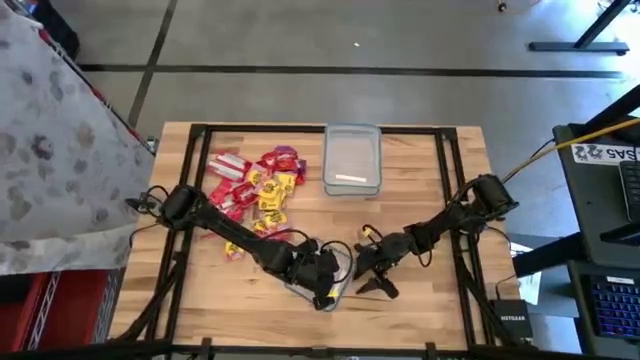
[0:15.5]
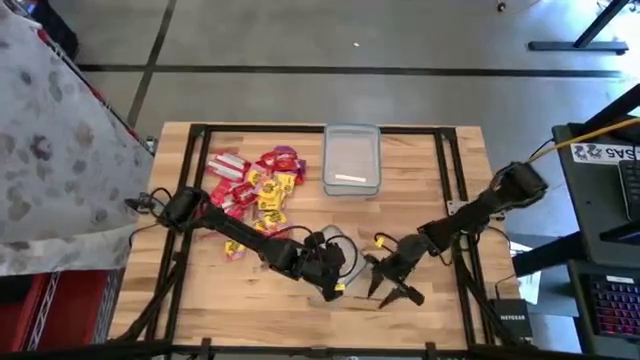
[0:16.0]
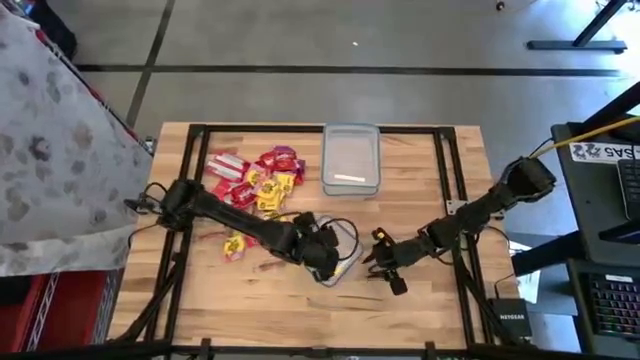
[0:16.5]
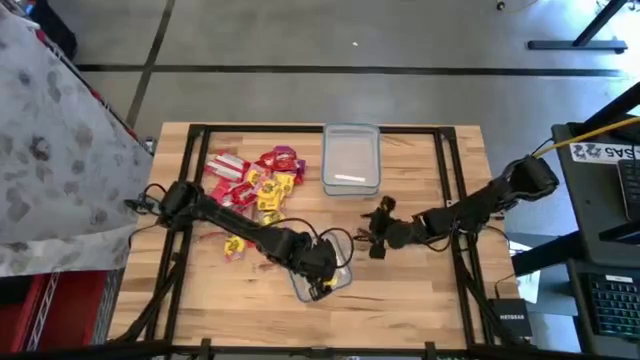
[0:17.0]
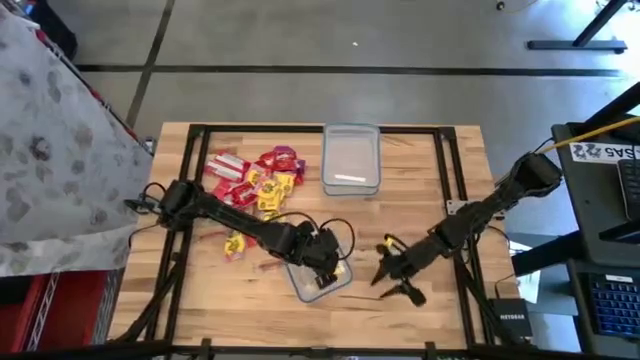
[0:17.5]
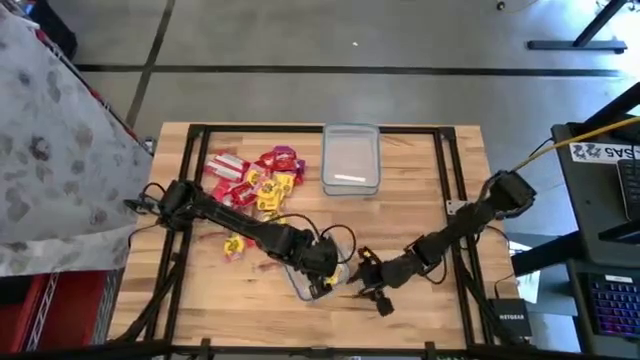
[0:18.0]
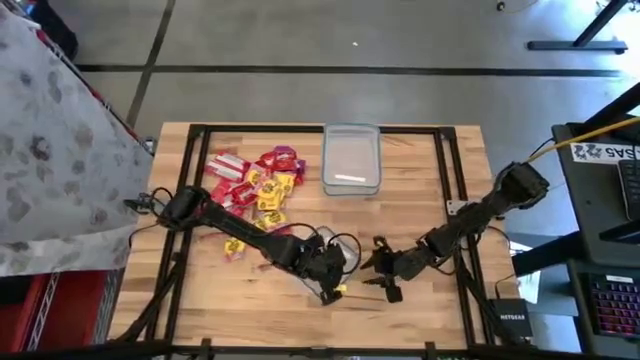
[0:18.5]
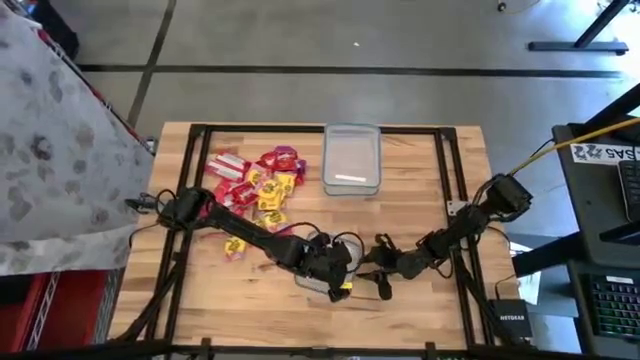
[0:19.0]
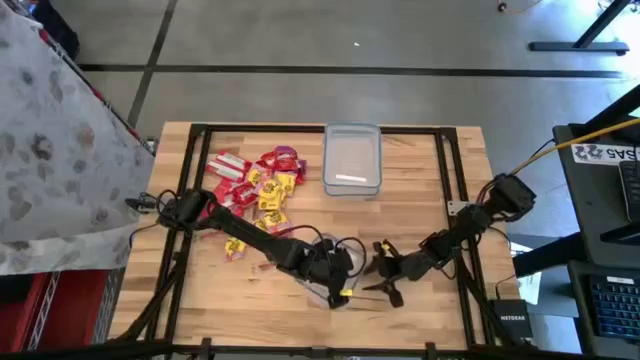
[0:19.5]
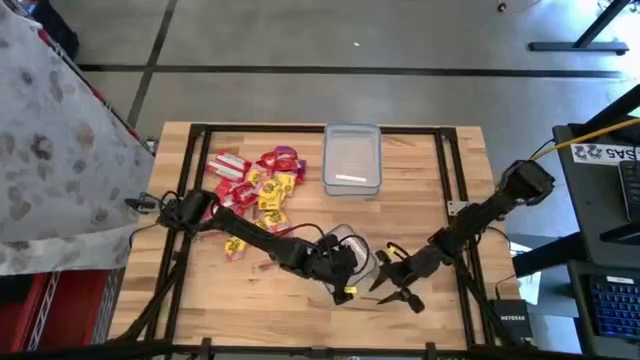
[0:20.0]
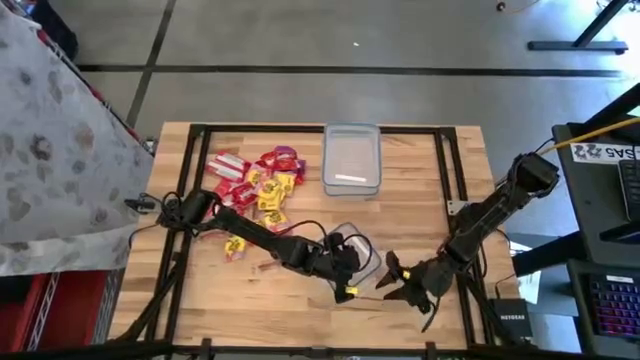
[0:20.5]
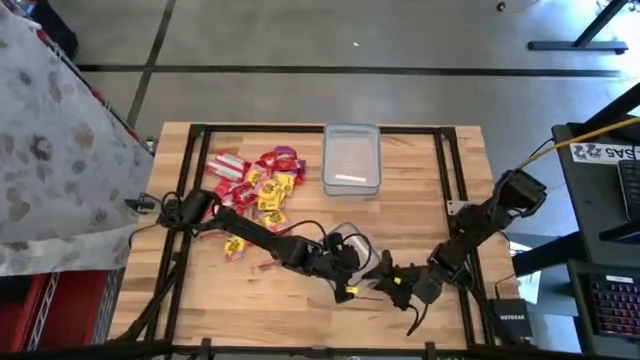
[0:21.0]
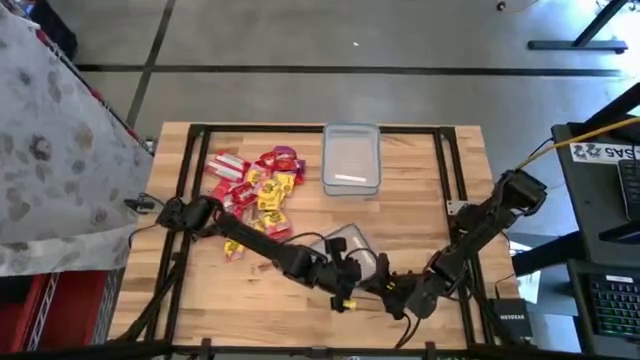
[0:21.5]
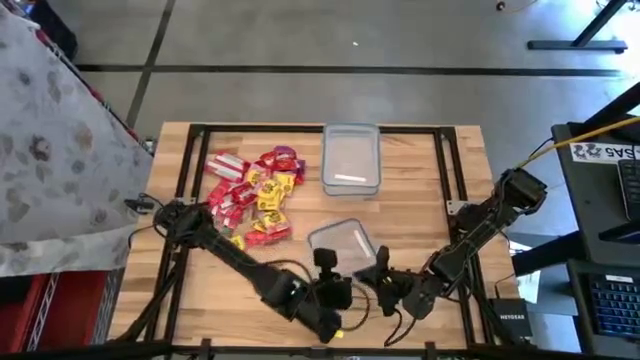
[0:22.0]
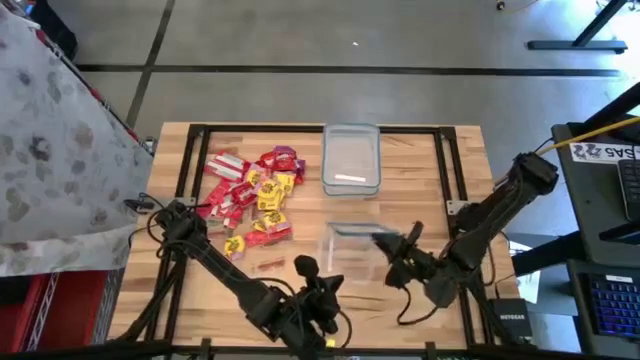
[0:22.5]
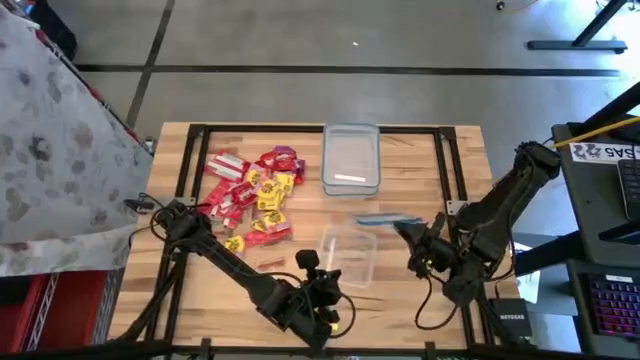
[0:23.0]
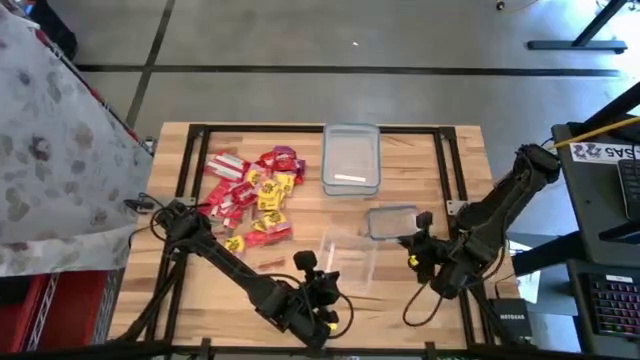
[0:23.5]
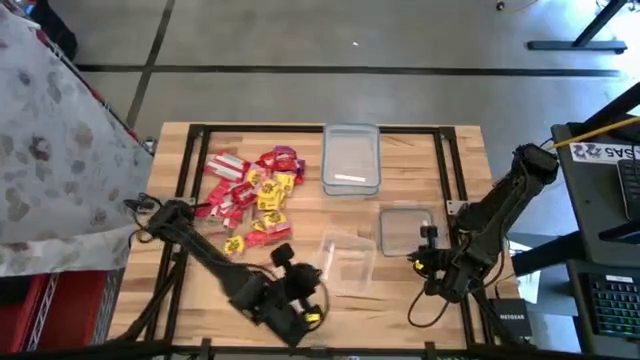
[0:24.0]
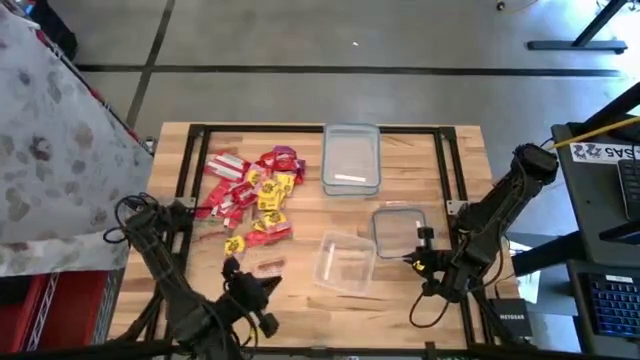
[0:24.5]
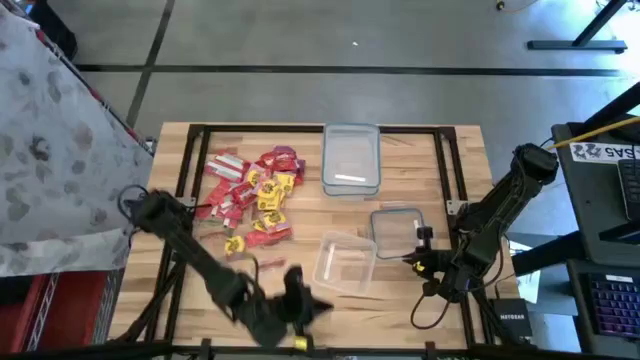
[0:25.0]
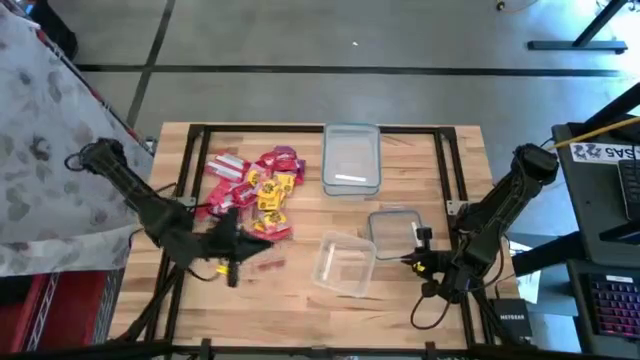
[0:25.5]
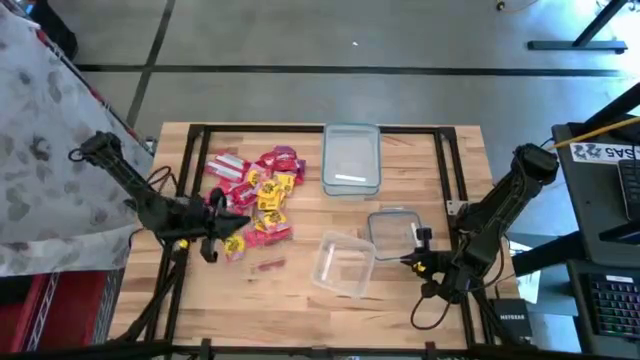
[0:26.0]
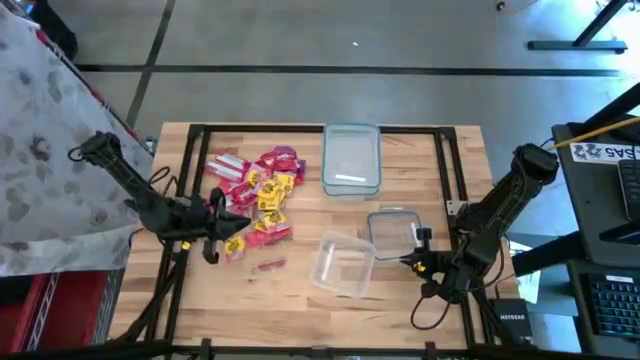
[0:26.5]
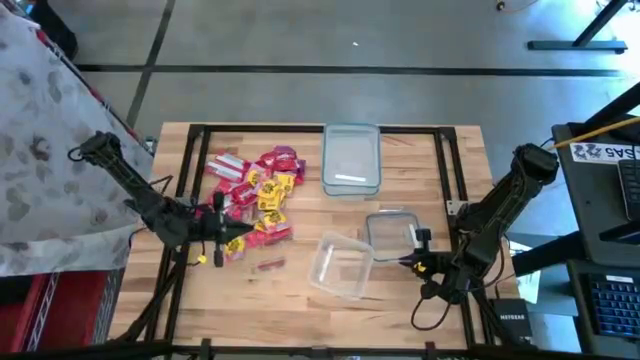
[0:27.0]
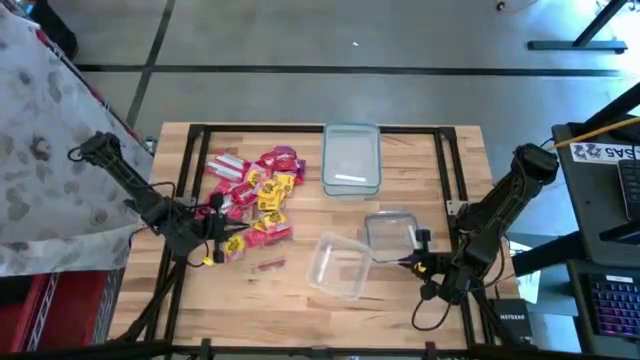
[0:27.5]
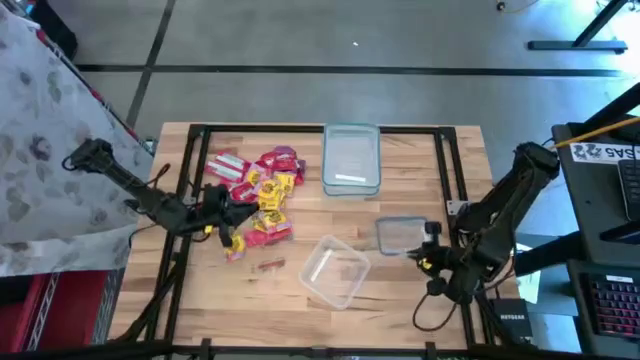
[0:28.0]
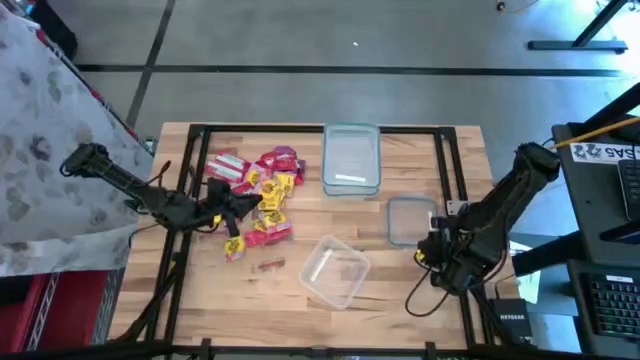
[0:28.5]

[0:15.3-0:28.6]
Task: Sort candy
Open the square transparent food container

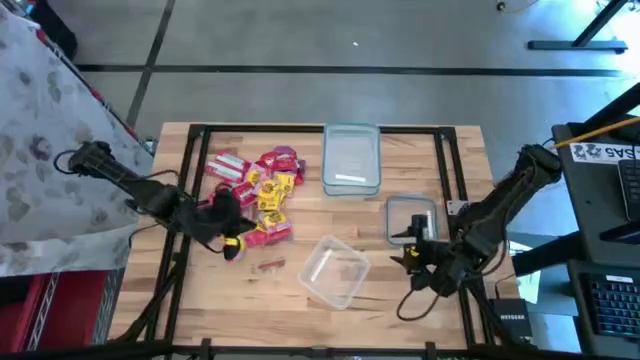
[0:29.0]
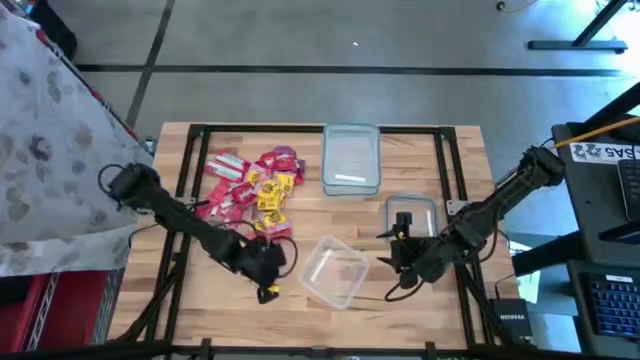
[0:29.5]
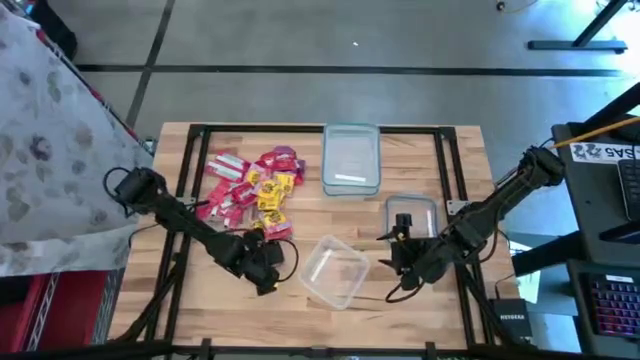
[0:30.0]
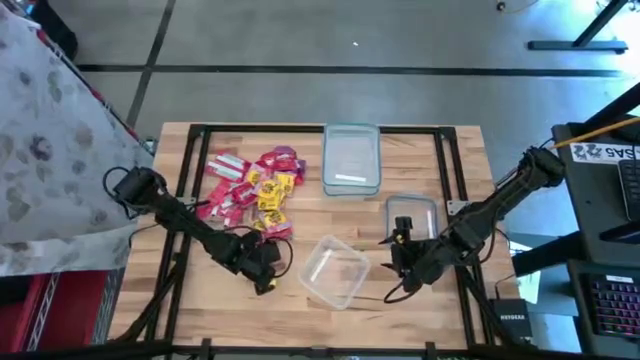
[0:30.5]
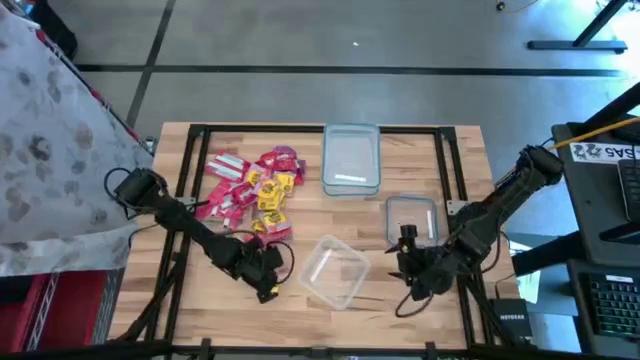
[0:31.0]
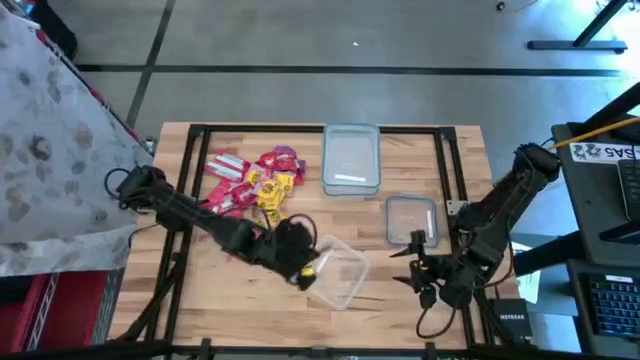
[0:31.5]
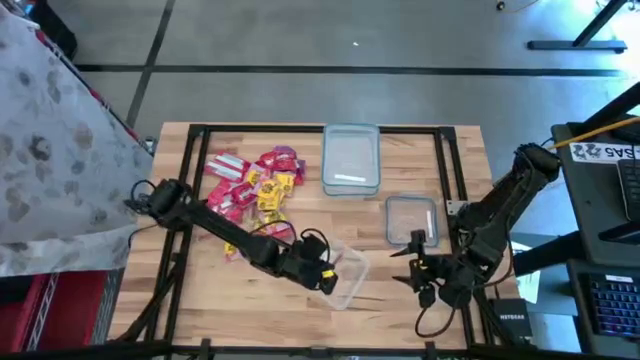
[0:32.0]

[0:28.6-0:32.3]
Put the red candy into the square transparent food container

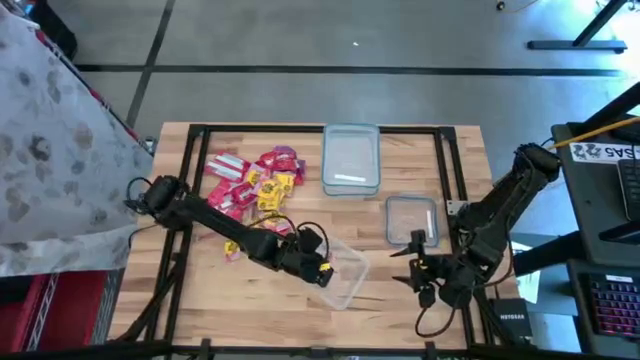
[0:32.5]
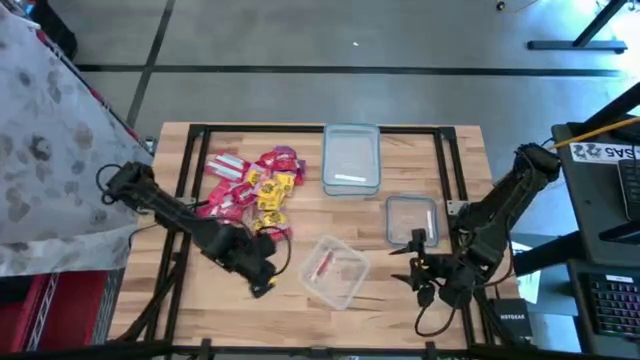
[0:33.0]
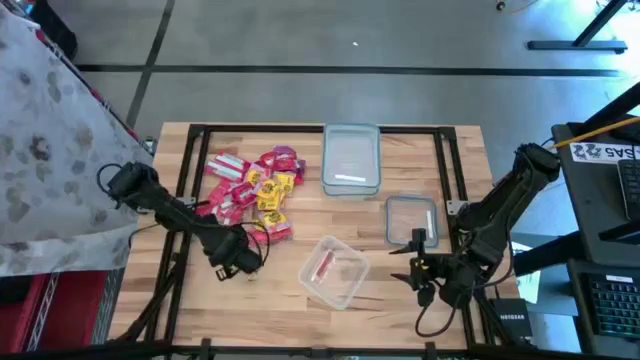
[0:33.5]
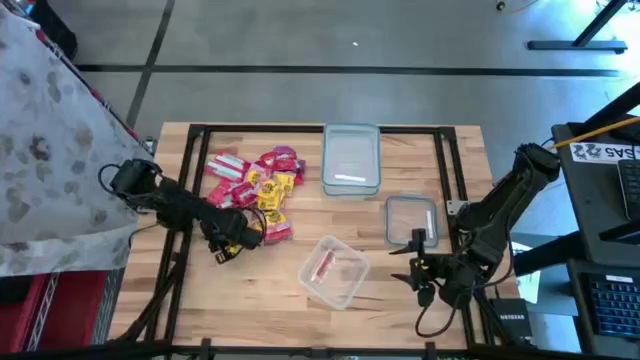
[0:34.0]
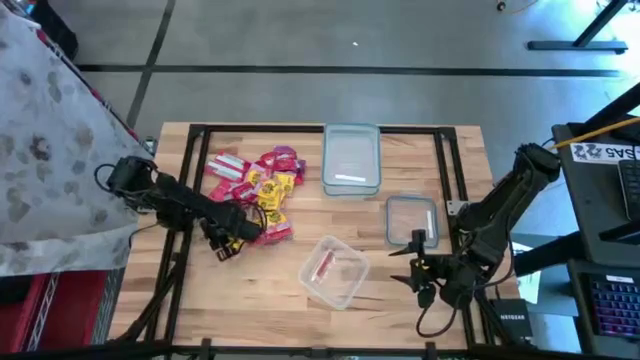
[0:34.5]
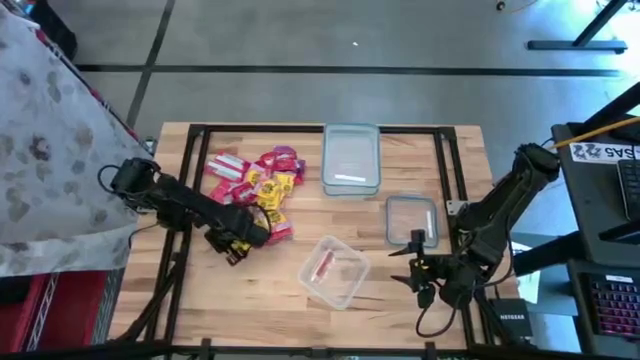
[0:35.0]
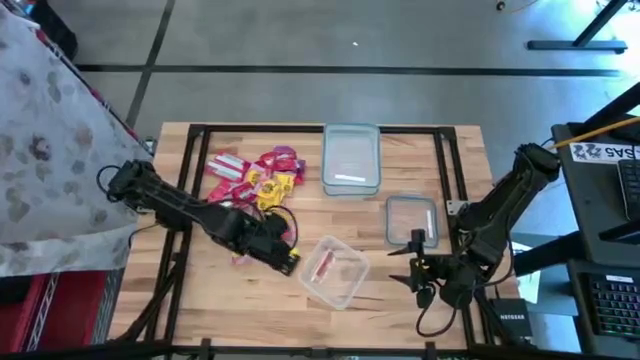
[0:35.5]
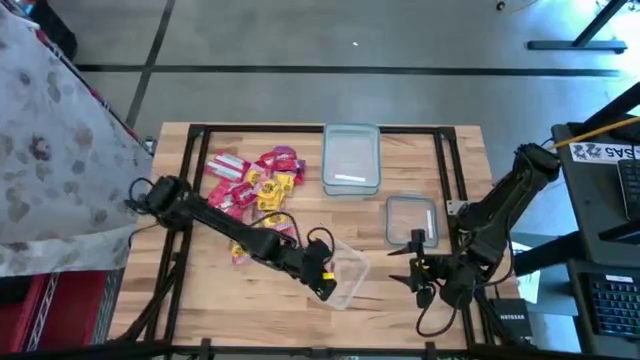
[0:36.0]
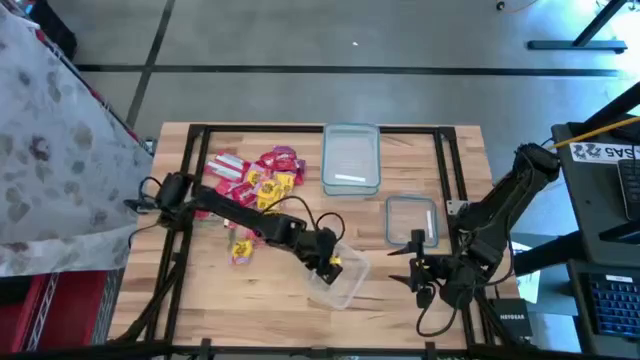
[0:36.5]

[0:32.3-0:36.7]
Put the red candy into the square transparent food container
